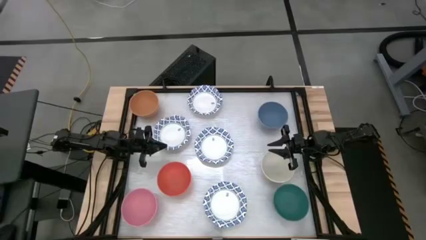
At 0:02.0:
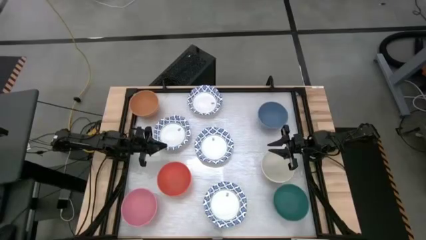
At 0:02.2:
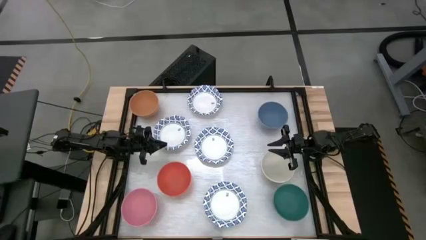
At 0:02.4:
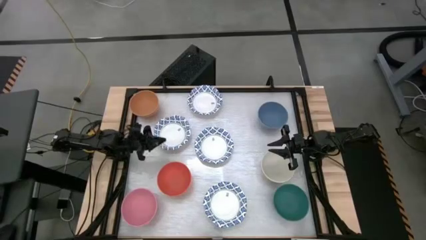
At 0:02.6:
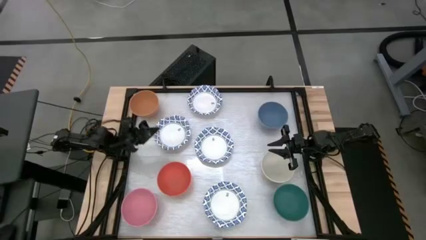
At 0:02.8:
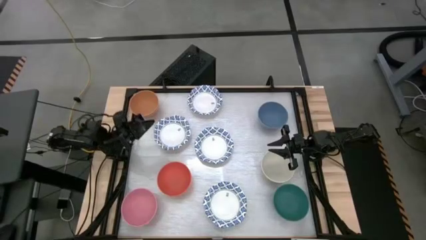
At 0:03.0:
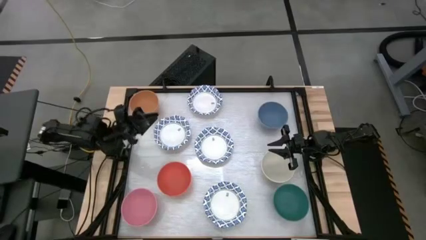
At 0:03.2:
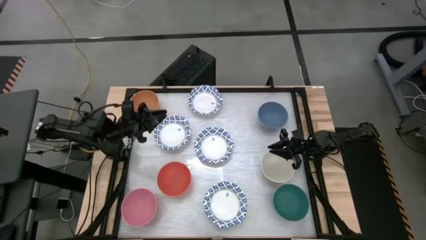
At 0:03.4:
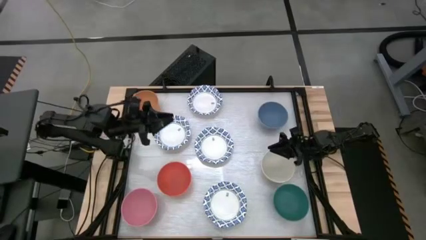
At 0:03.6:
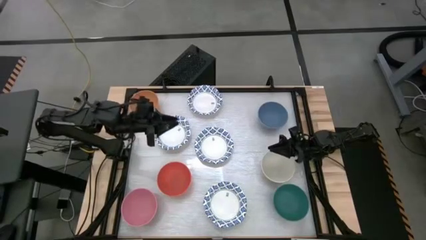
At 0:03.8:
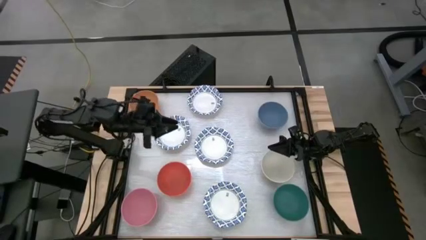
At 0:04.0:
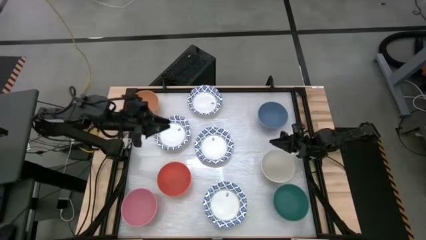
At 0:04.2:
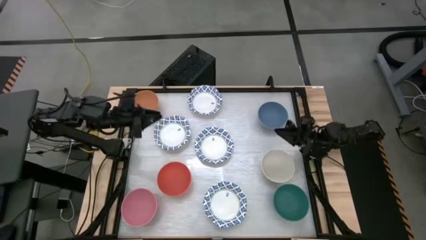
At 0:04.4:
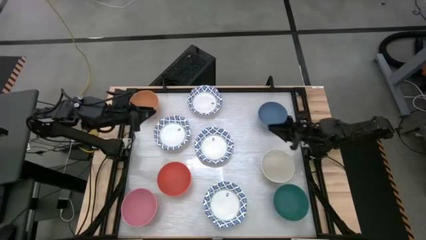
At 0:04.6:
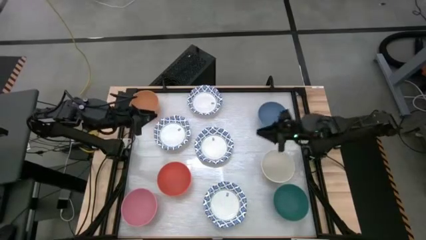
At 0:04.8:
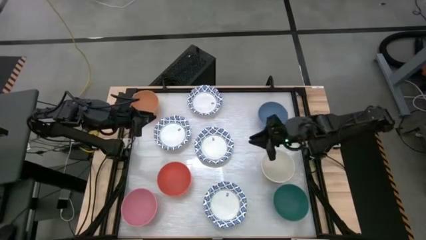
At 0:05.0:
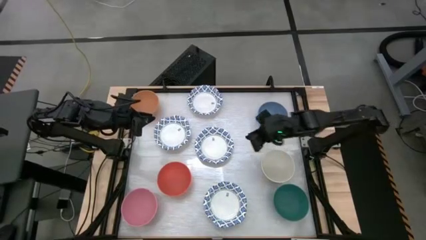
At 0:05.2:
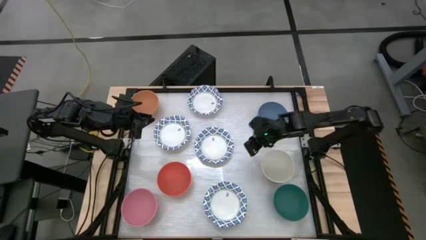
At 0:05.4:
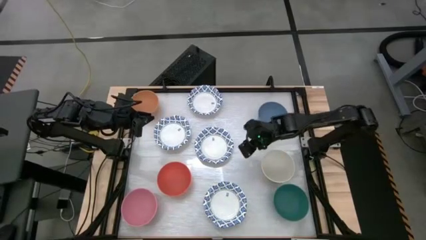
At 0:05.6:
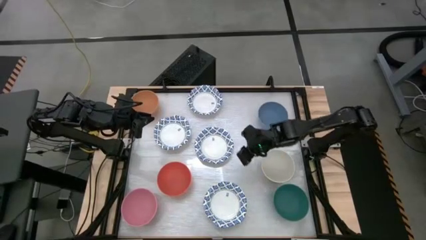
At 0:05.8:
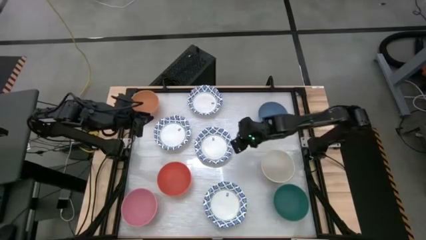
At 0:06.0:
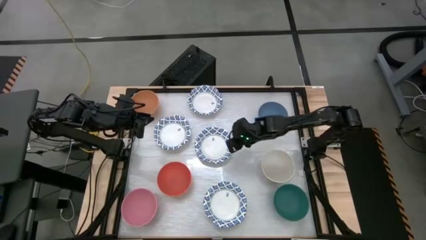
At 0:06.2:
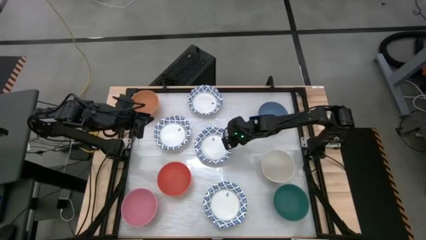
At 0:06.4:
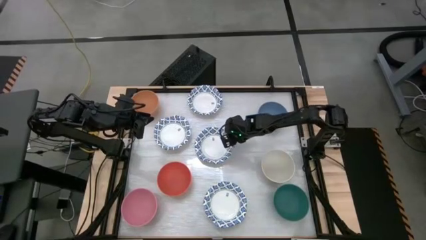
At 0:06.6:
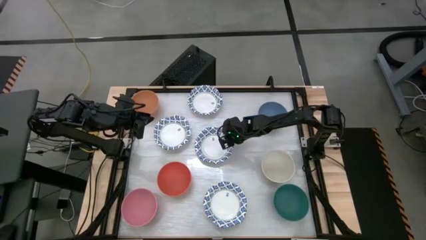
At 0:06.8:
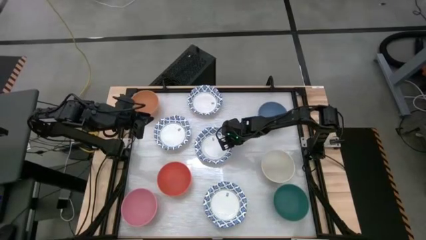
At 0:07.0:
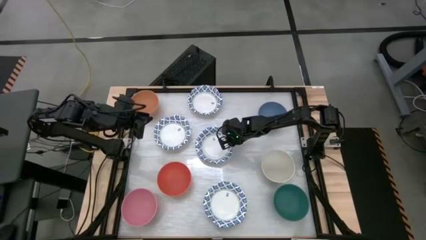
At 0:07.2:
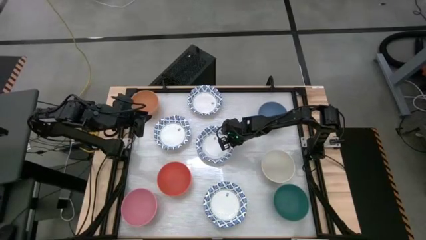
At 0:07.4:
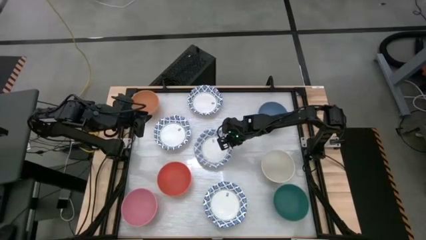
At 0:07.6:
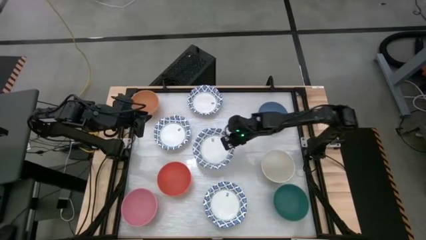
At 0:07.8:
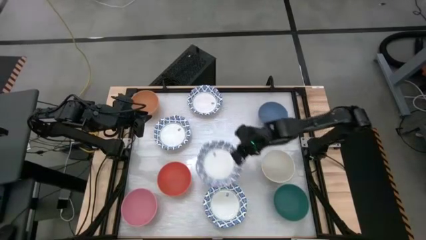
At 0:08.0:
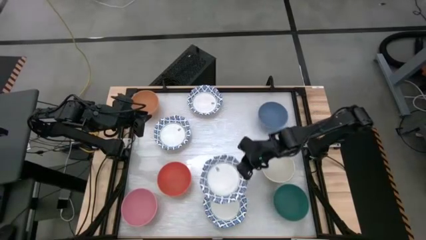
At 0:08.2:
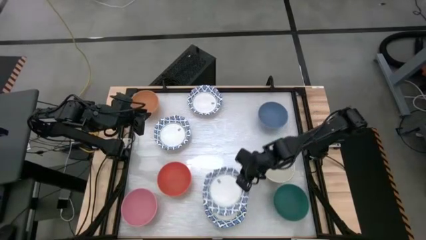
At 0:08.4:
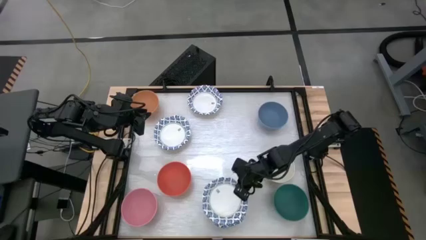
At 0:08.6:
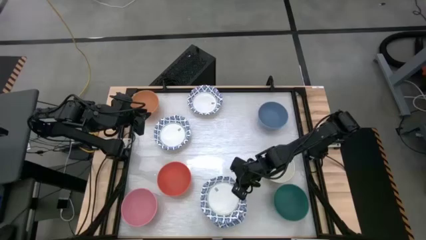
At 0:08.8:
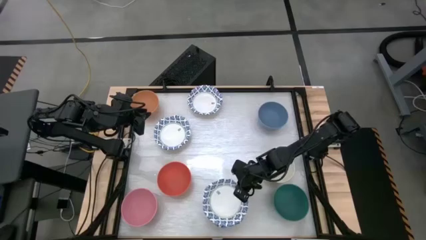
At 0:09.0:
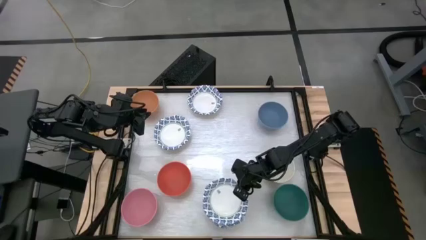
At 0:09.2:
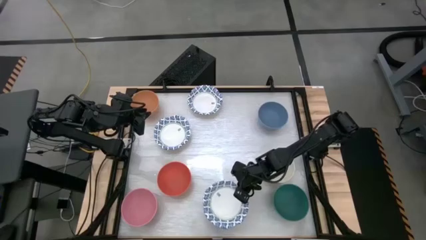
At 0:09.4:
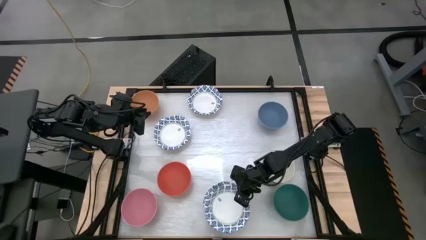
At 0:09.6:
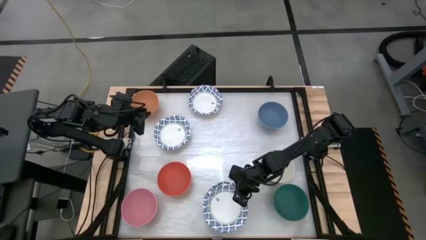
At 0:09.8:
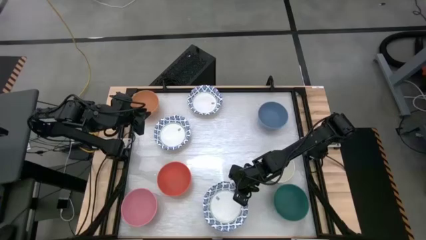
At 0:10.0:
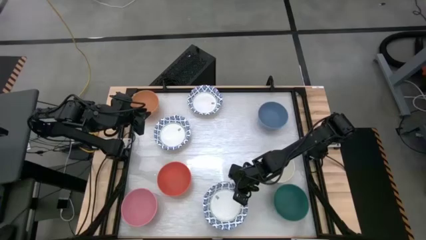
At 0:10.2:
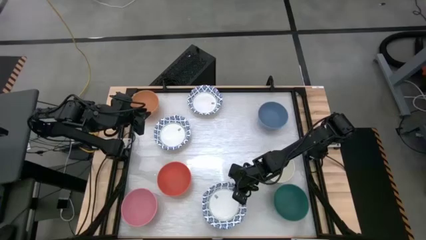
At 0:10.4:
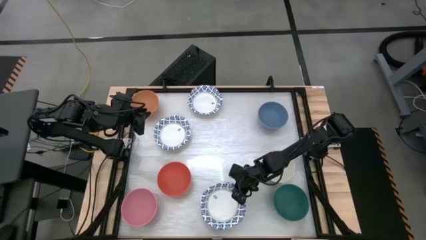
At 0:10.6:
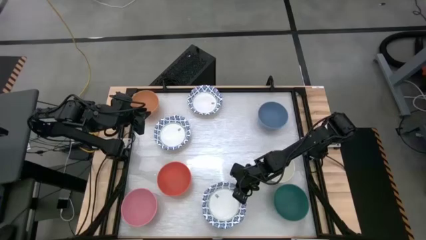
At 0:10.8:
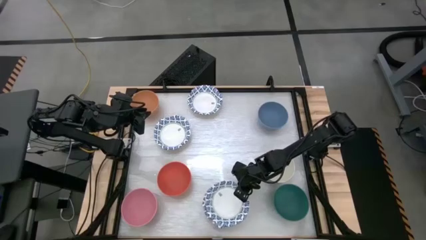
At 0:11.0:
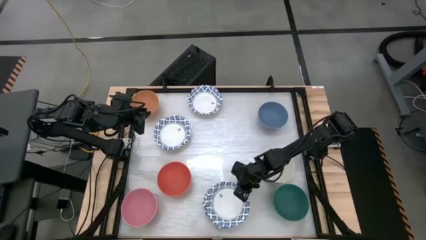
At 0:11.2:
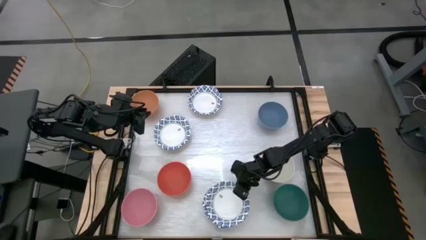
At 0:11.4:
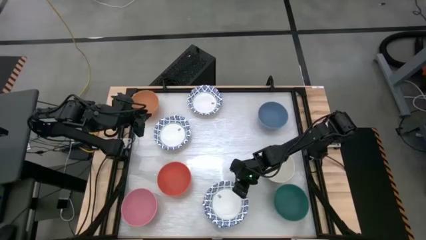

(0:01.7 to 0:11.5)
Task: Nest bowls inside each other by size order
Stack the white patterned bowl on top of the white patterned bowl

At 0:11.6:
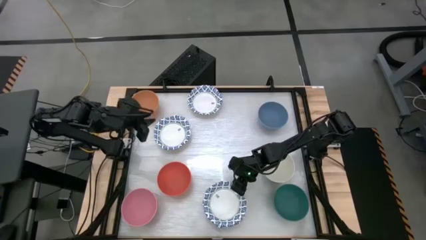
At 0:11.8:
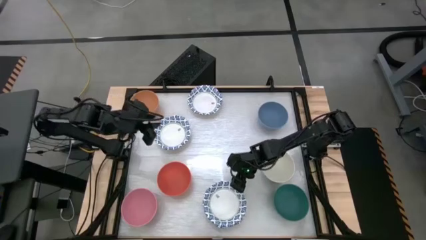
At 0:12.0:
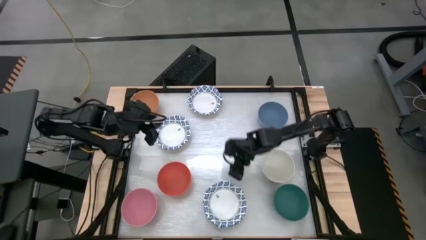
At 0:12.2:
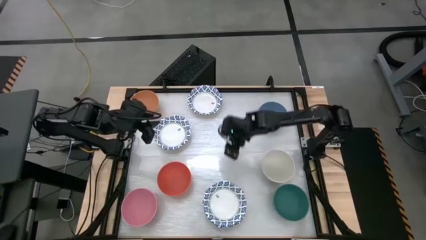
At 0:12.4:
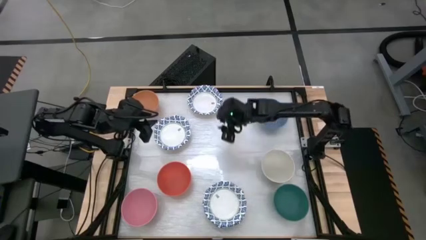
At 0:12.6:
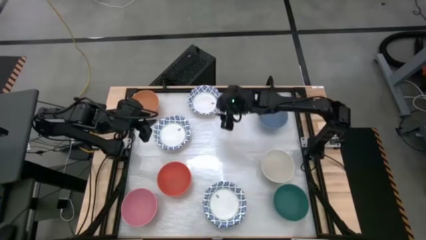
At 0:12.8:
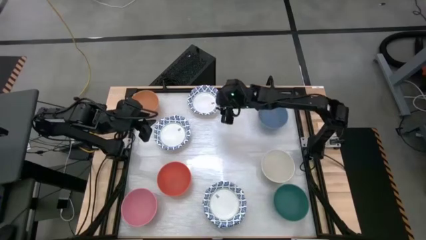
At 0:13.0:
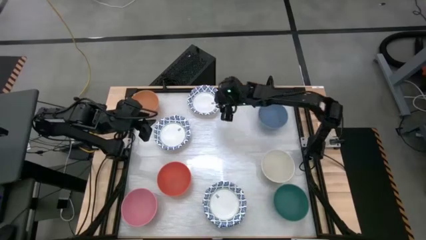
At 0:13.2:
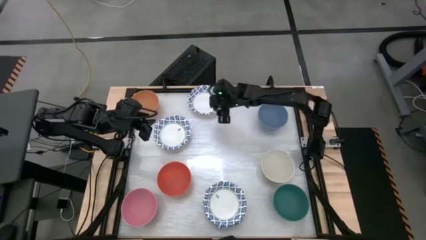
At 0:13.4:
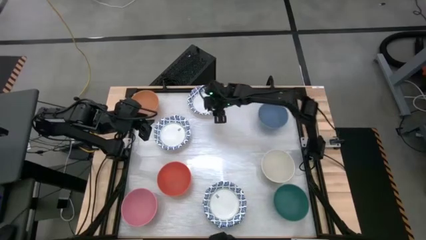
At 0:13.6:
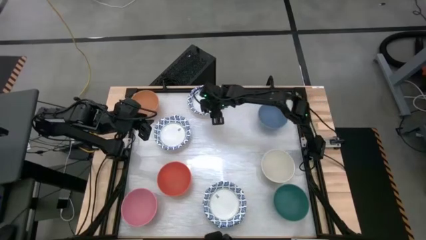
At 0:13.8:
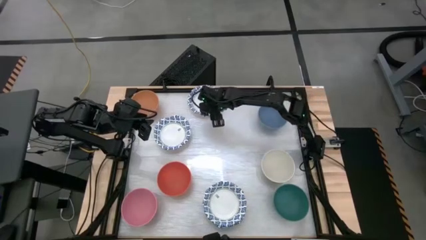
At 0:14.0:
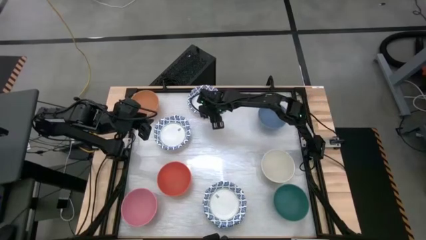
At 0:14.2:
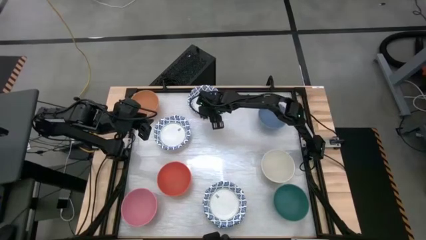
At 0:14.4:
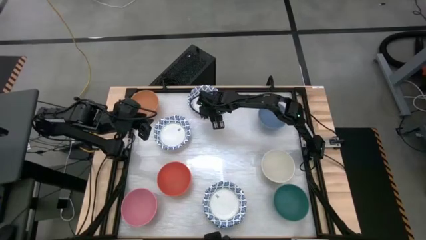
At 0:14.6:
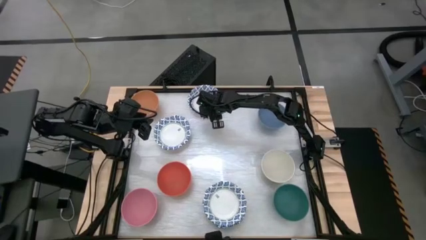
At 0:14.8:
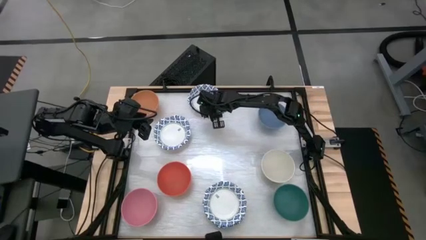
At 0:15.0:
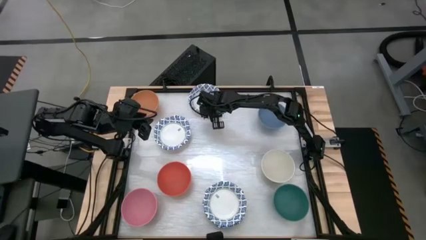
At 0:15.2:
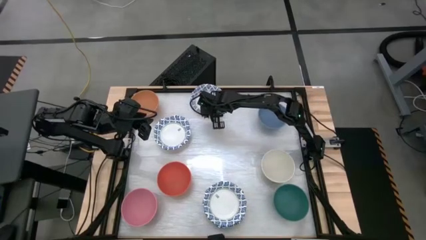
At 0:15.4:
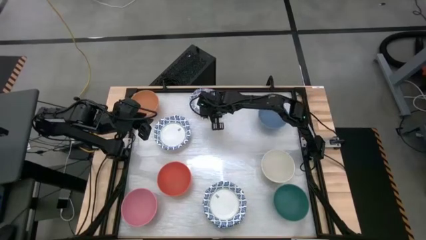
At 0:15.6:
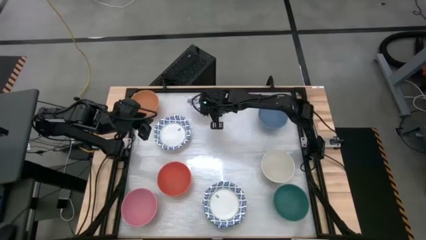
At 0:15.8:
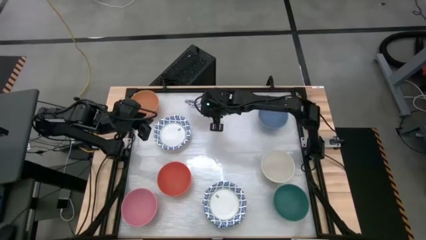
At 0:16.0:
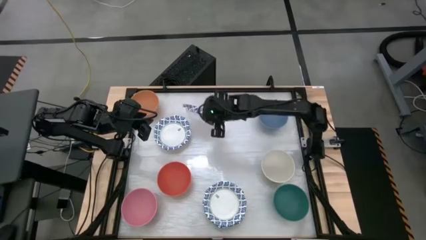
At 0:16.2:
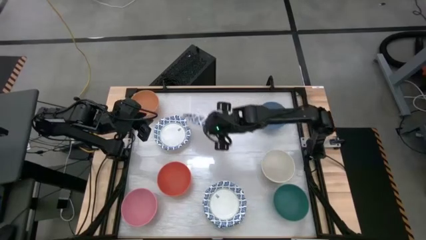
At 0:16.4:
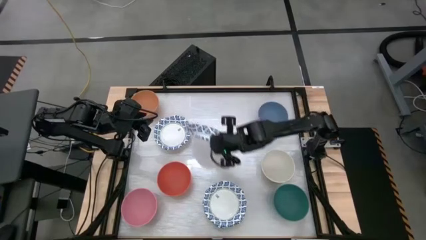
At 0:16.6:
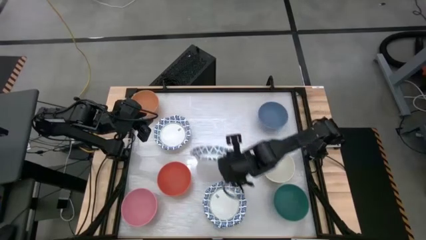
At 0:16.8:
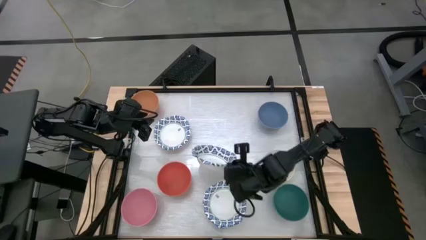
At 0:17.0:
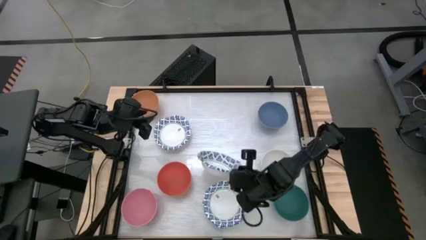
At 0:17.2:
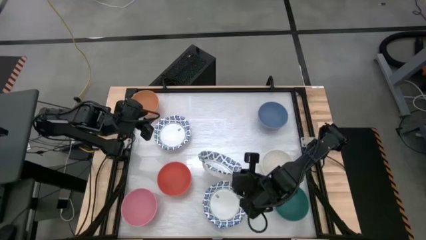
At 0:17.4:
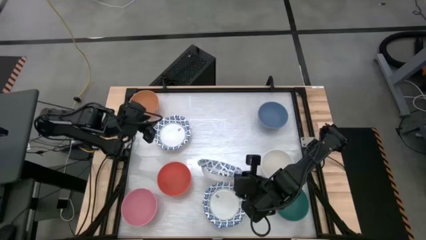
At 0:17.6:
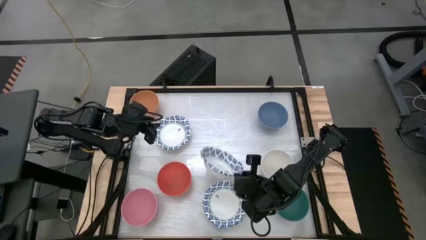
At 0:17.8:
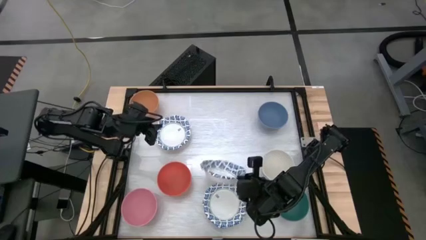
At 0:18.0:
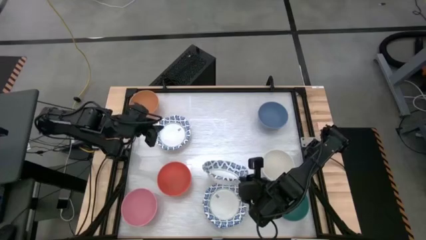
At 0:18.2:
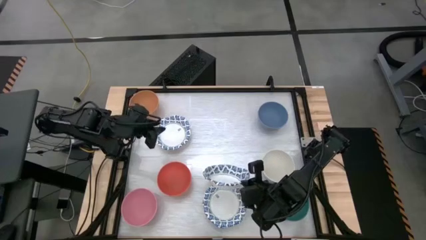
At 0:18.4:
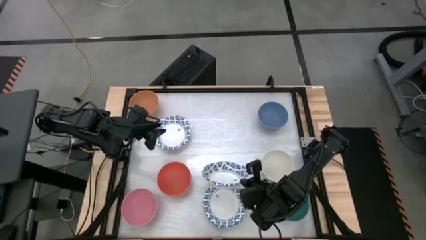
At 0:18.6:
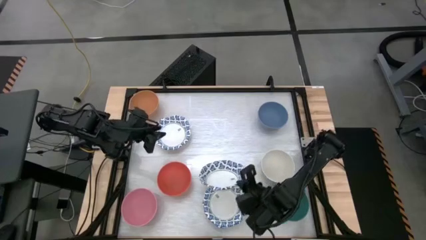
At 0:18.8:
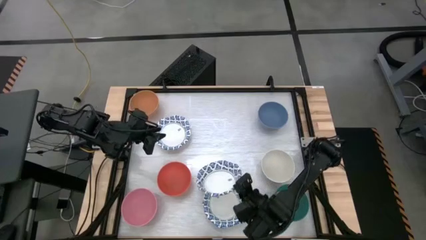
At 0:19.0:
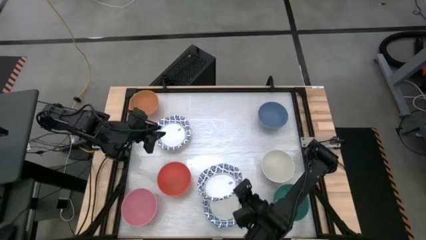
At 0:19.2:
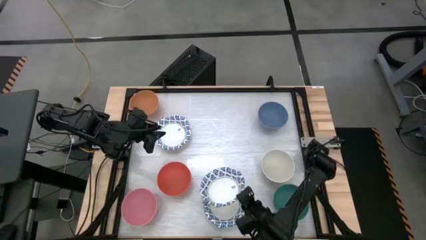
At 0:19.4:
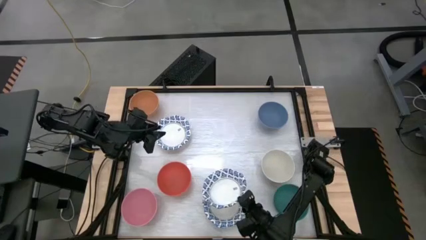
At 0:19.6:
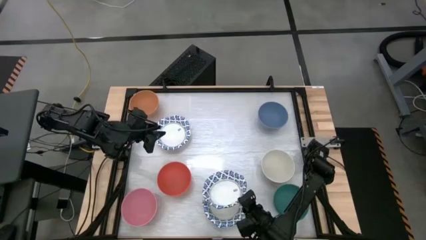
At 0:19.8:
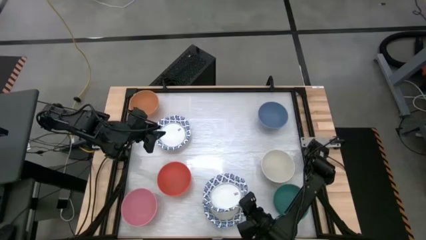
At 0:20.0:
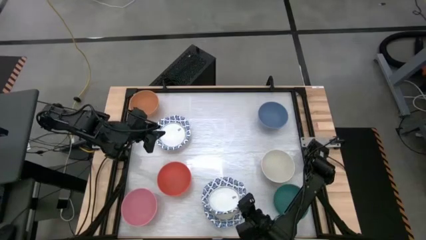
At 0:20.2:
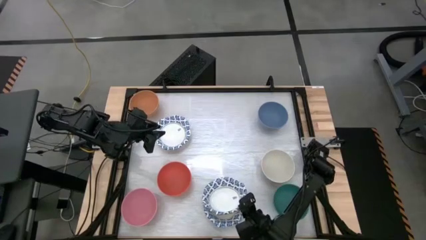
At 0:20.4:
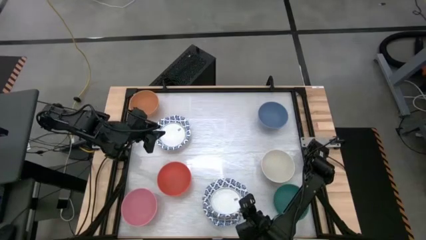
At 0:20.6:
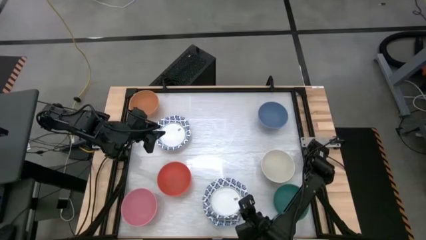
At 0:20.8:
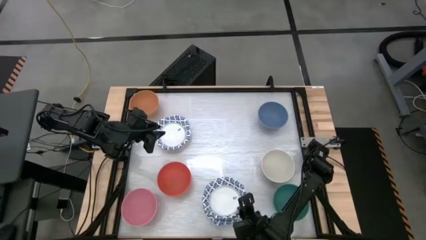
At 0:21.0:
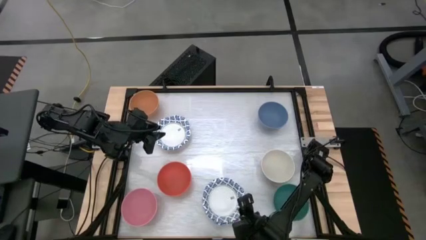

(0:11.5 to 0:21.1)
Stack the white patterned bowl on top of the white patterned bowl
